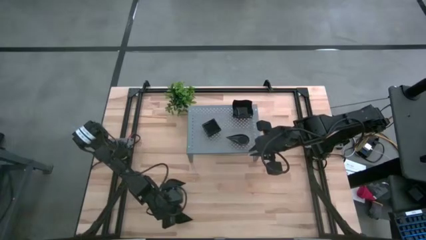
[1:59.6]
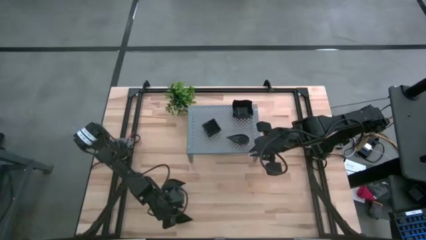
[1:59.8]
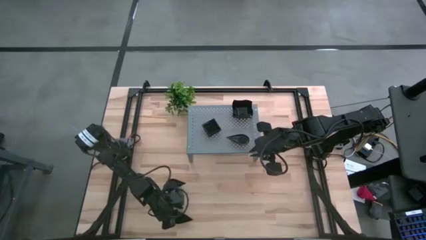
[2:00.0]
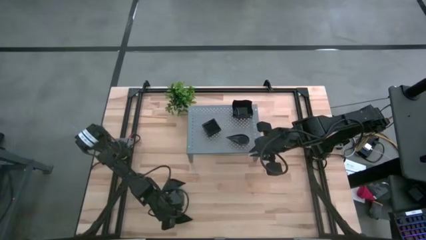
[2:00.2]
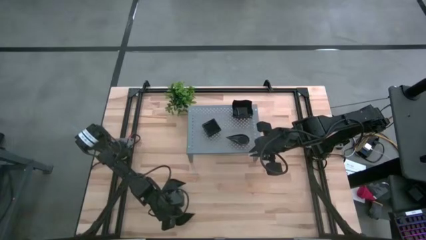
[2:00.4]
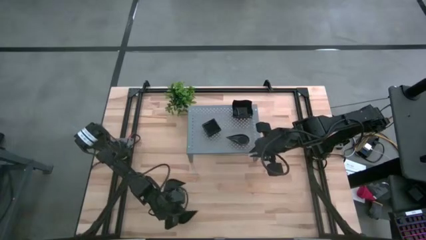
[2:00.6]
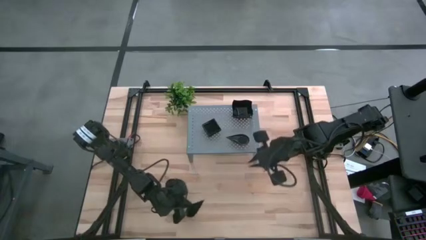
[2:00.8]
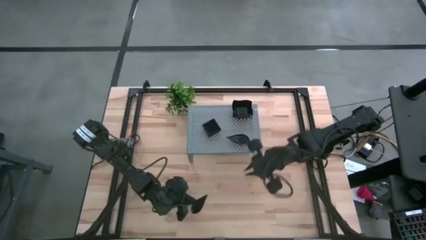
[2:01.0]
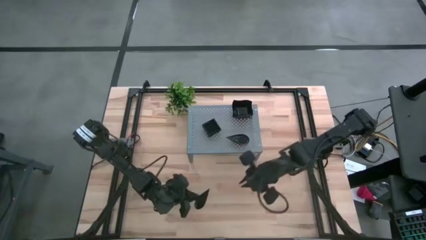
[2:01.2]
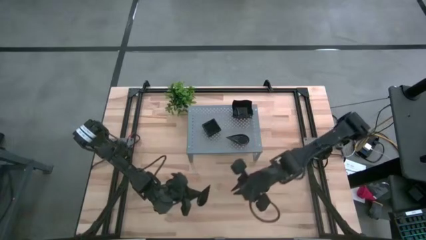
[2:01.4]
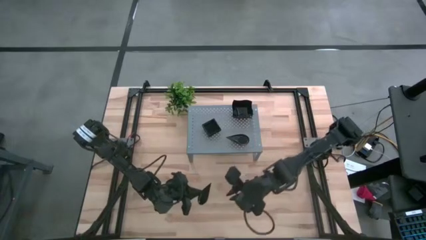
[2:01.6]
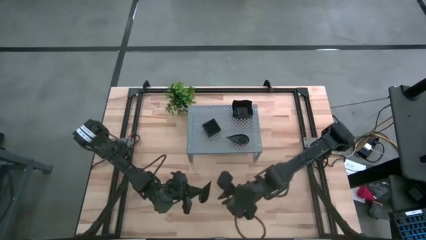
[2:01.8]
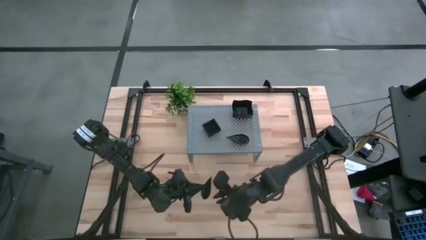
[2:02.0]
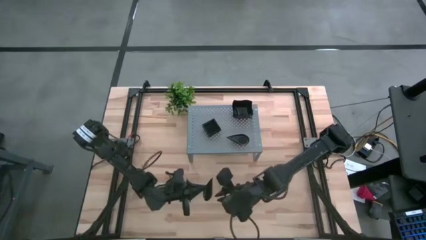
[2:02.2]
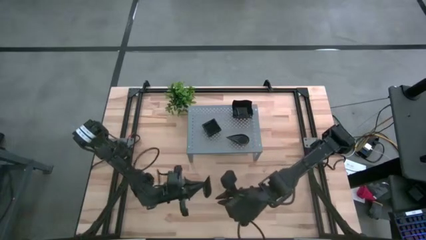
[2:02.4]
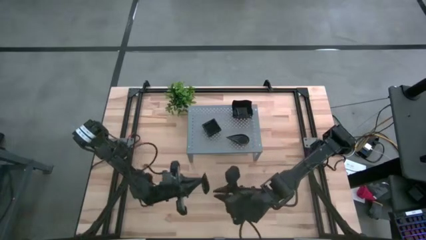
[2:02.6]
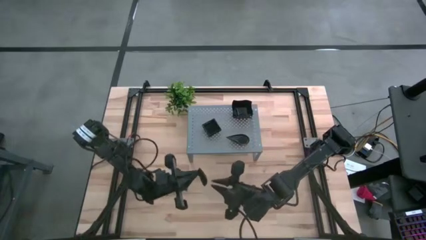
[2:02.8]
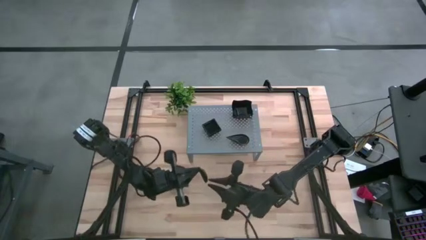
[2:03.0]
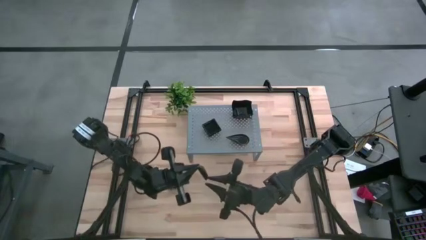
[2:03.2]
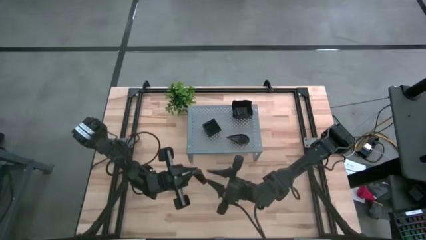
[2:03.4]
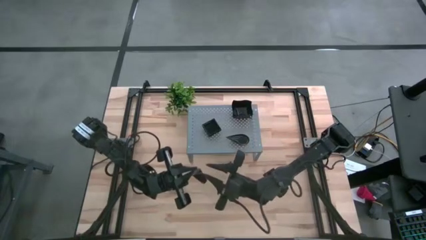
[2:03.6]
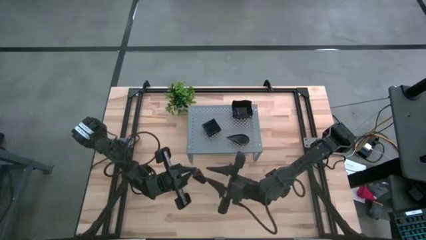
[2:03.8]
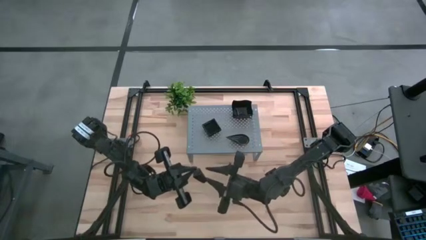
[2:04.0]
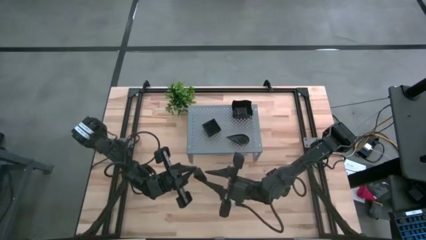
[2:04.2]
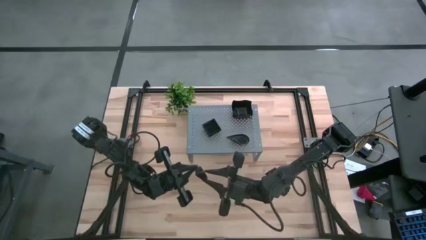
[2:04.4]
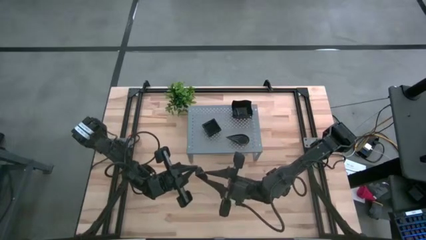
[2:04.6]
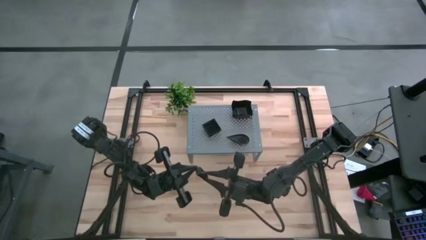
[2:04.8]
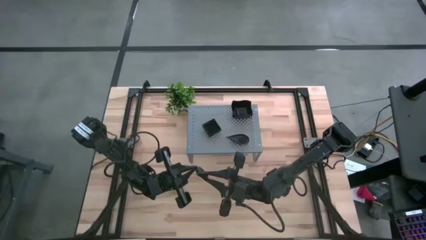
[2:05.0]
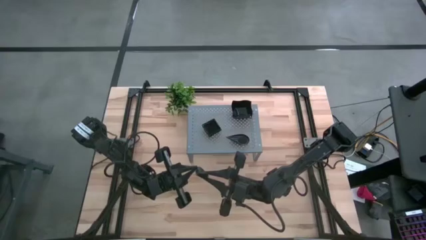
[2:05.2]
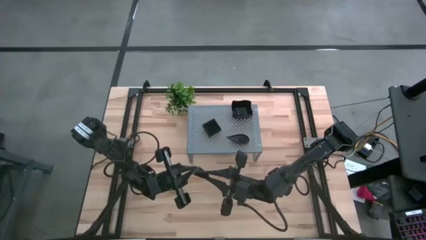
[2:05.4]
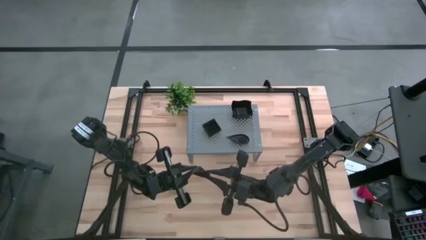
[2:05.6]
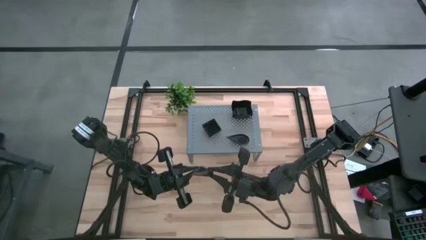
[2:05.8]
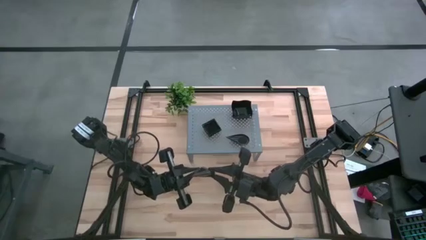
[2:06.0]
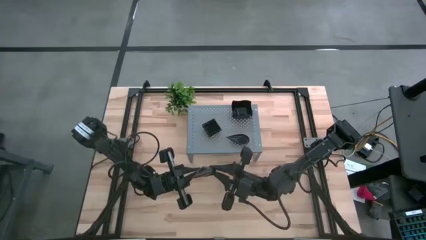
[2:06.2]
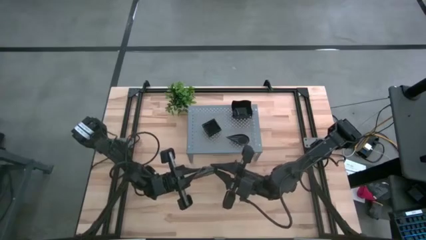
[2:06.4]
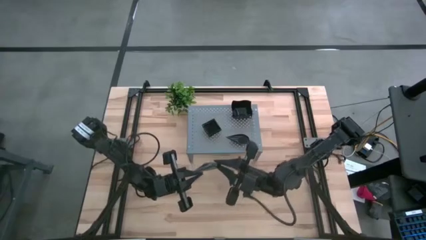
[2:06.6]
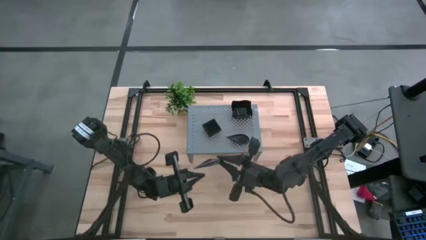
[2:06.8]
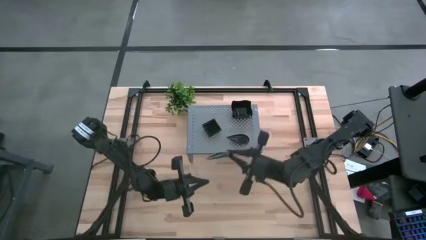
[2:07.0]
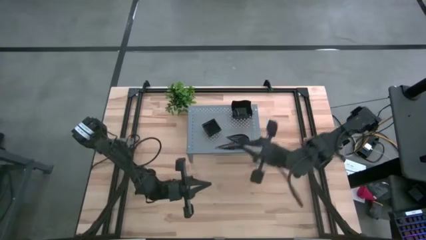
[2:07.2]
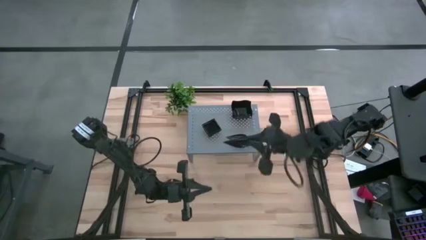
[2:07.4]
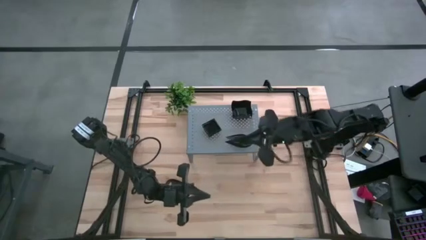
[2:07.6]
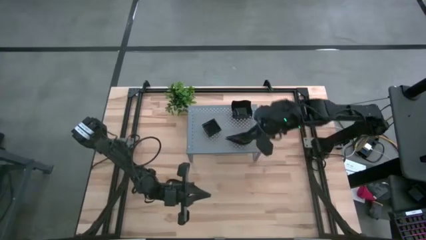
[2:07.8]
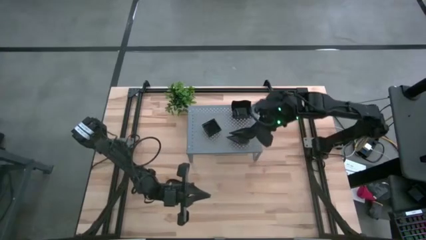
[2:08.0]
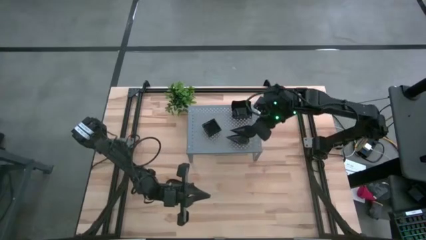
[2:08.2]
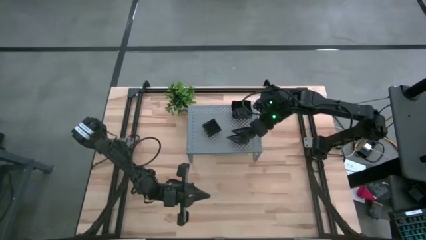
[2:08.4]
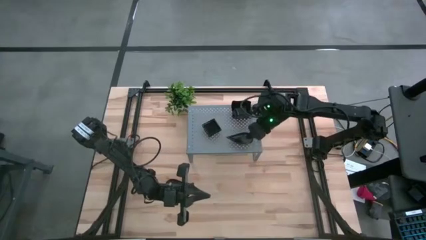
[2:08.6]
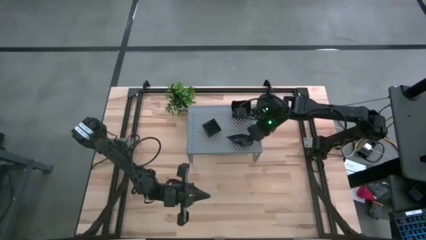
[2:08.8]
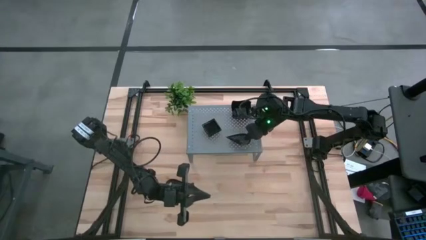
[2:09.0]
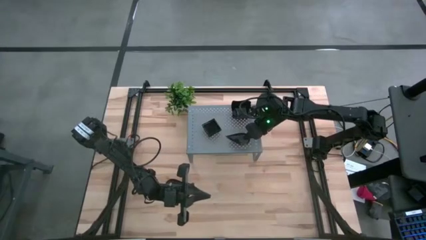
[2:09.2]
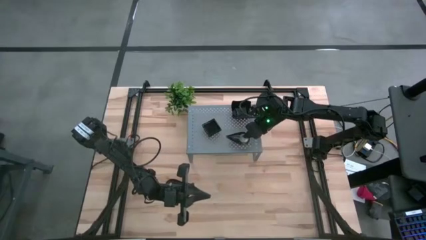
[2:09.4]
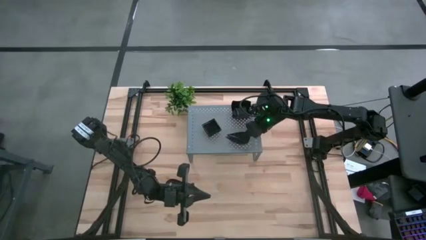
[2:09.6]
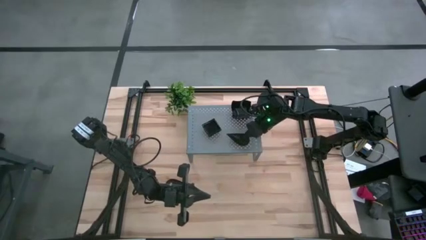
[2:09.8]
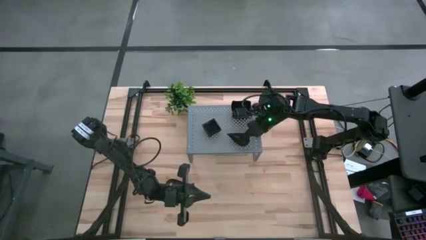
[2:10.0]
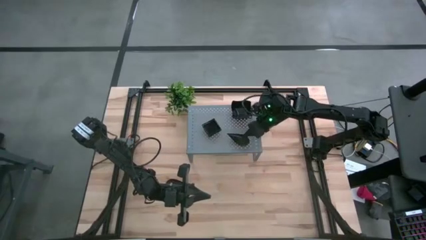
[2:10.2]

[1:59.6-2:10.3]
Task: Pick & Place Mini shaped plates
Stack the black drop-shaped plate on top of the black drop-shaped plate on the shelf

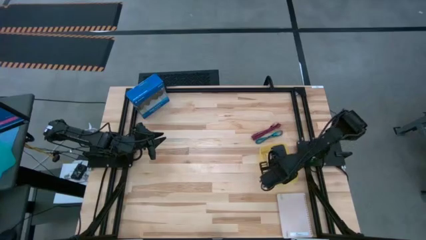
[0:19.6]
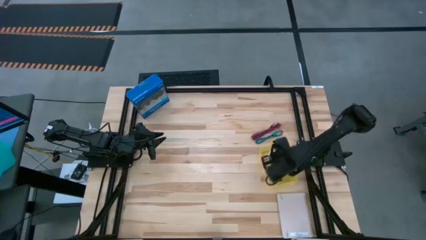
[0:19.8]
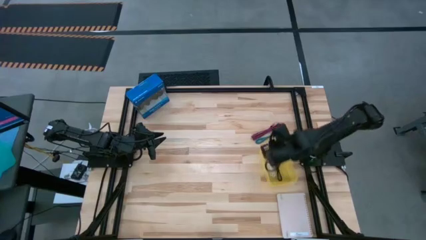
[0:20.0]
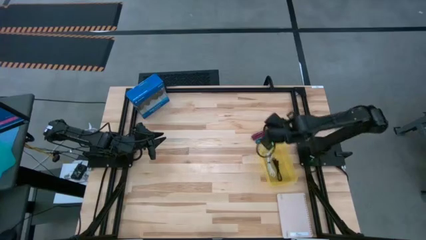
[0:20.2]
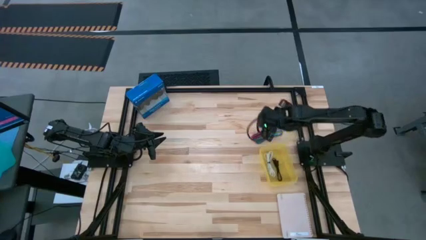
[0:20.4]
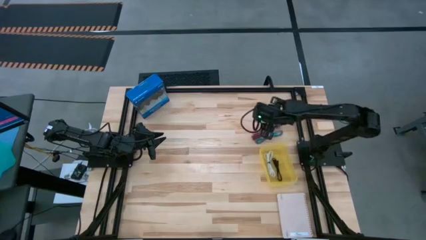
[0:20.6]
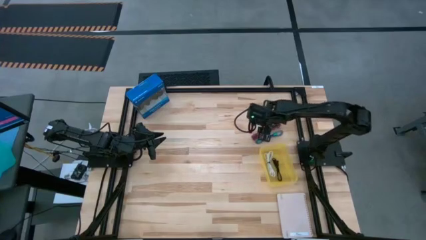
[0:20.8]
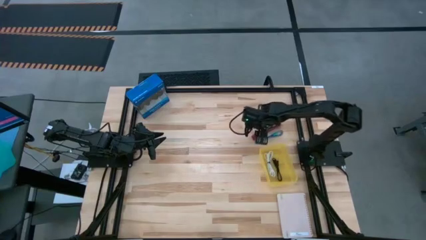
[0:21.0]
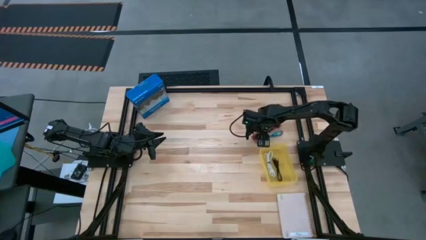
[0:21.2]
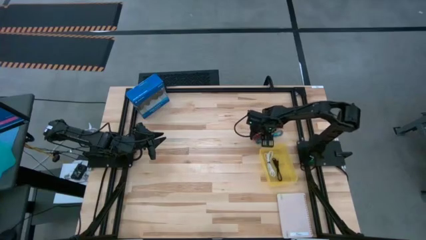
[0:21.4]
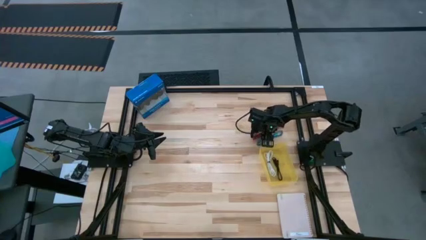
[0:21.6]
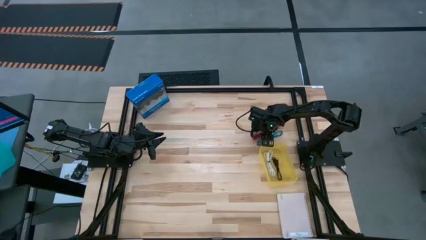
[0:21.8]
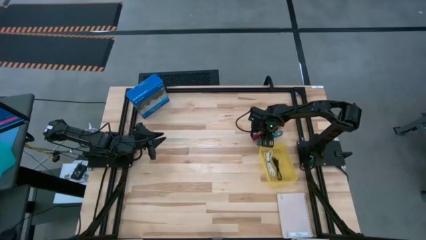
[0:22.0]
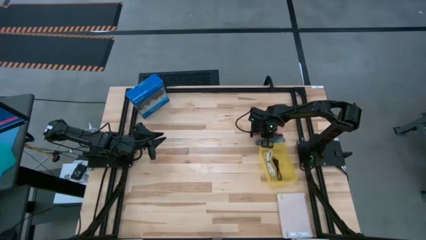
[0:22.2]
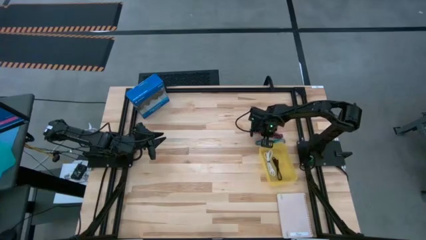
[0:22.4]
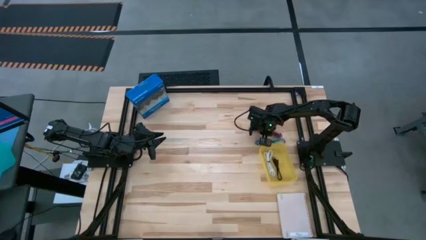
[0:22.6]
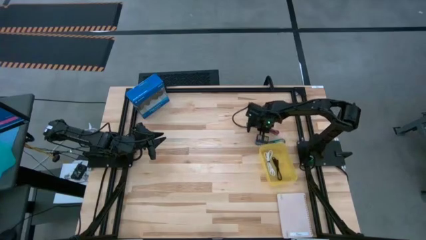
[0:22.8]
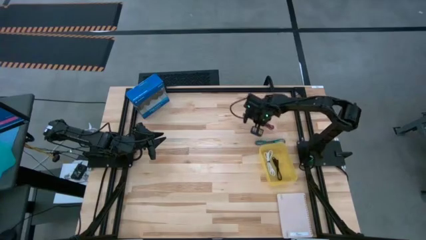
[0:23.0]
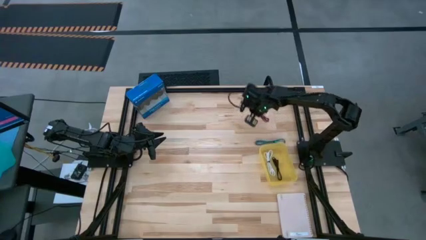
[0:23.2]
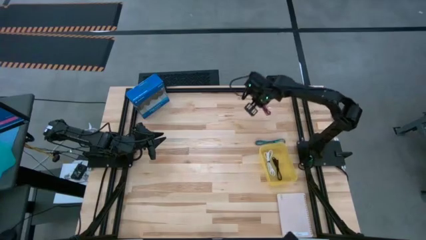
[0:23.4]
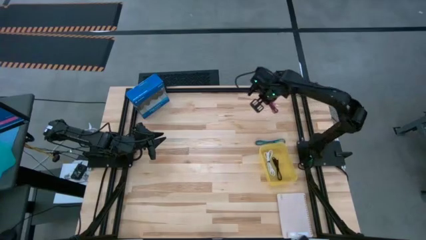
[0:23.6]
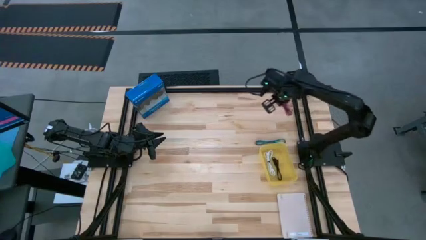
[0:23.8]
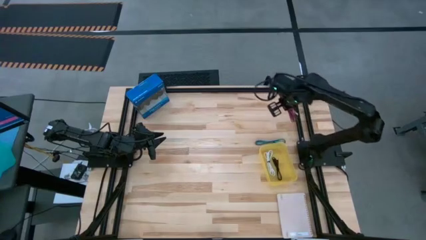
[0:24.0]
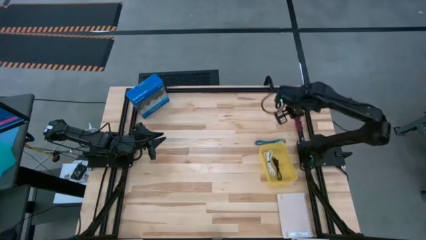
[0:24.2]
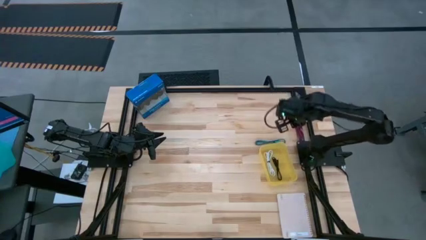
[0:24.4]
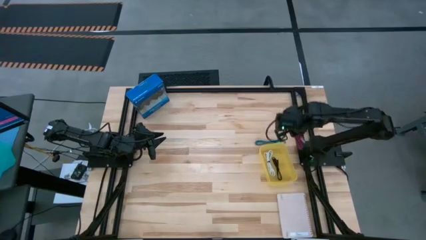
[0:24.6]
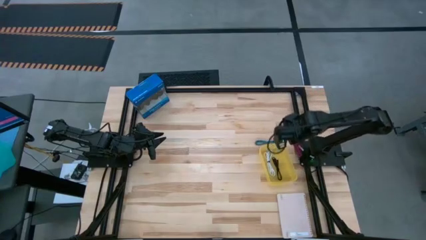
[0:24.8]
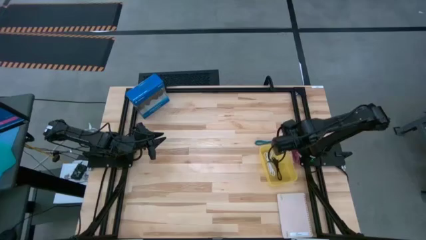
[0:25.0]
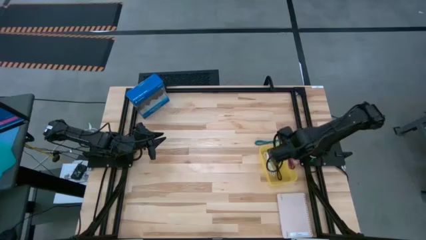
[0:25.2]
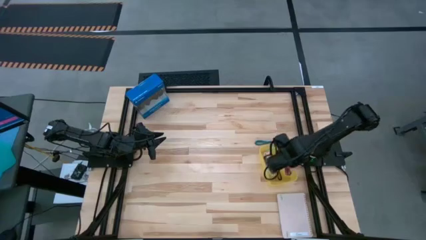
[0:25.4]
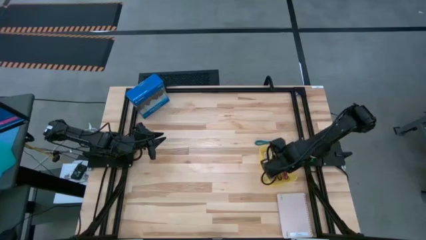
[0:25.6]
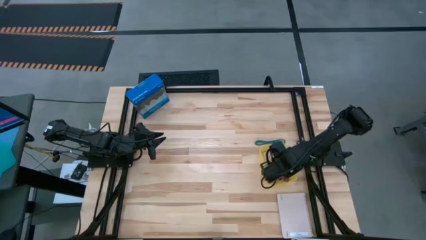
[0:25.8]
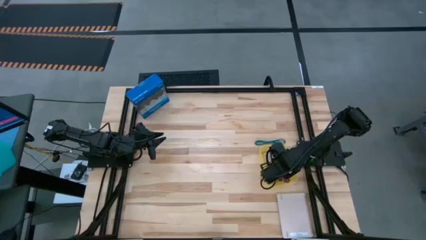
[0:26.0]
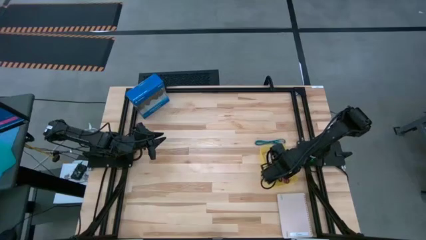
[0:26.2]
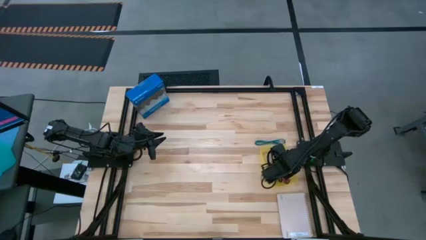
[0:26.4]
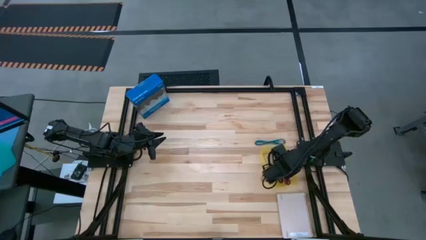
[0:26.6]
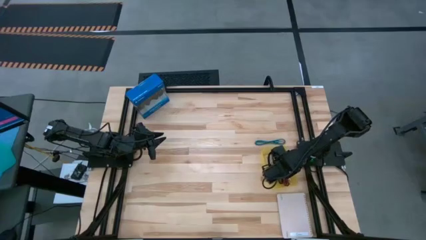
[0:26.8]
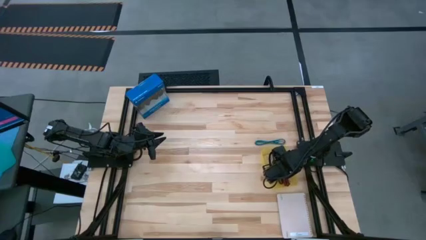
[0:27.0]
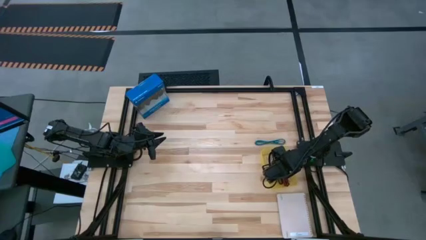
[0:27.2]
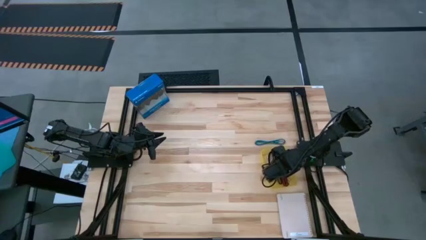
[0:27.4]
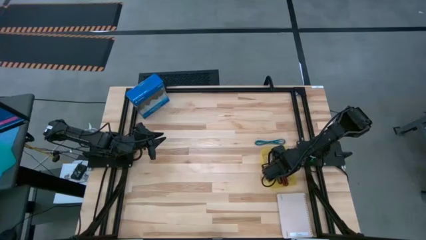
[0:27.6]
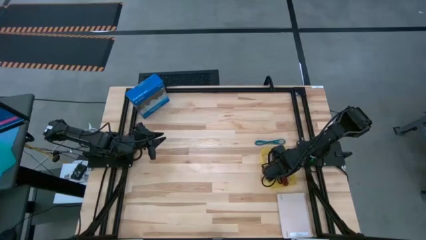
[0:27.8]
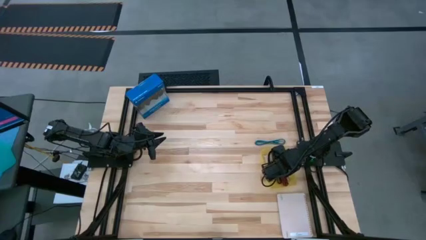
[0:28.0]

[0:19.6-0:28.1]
Task: Pick and place USB-C Cables
Put the pink charger cable into the yellow bin
